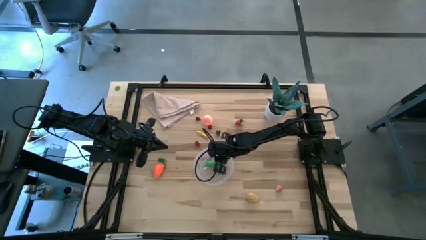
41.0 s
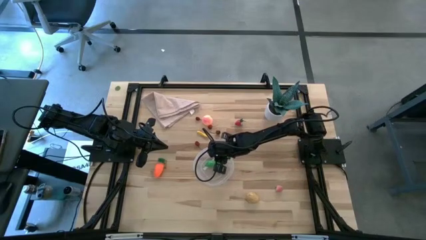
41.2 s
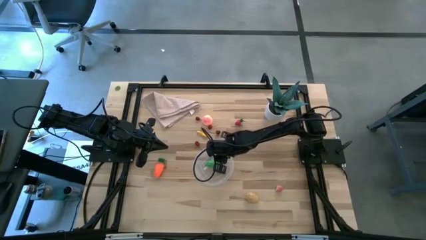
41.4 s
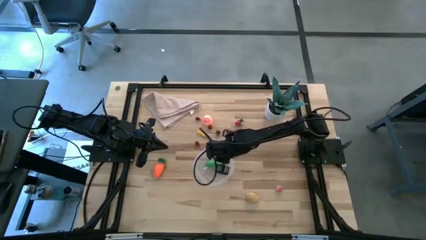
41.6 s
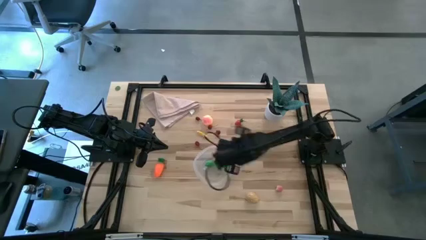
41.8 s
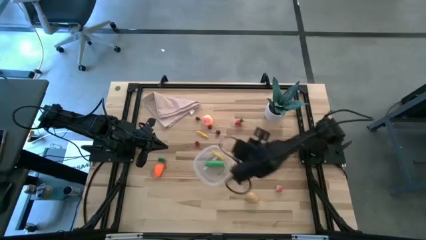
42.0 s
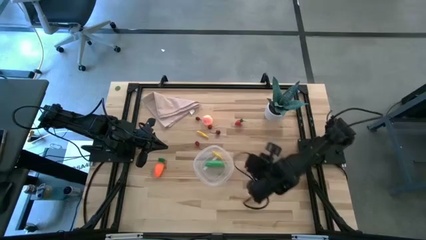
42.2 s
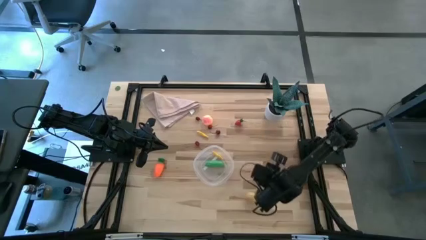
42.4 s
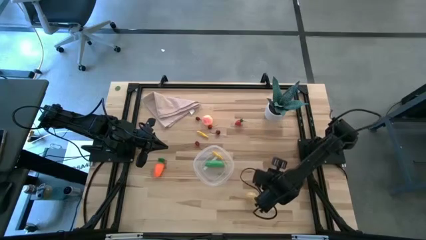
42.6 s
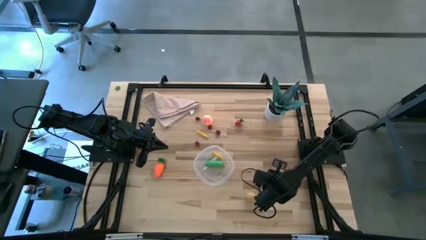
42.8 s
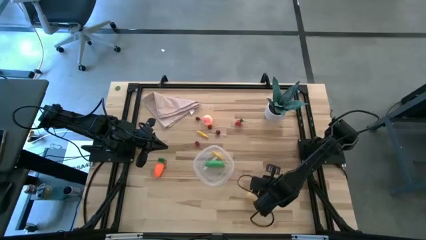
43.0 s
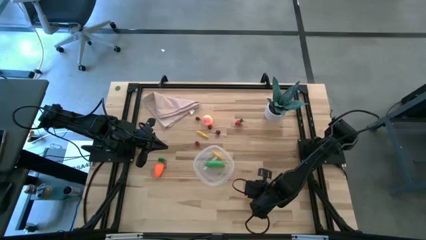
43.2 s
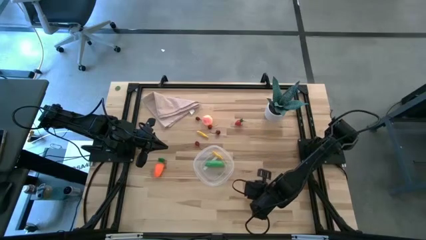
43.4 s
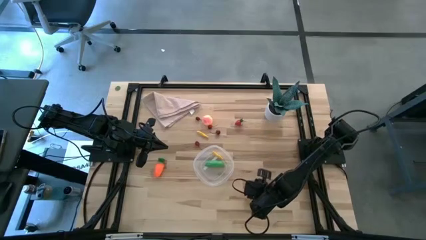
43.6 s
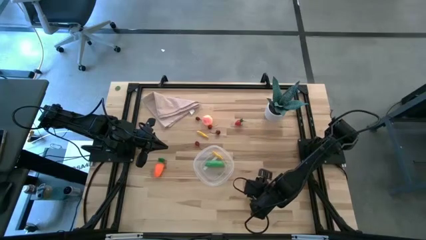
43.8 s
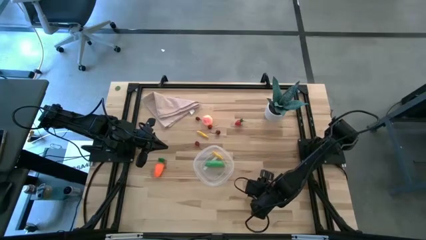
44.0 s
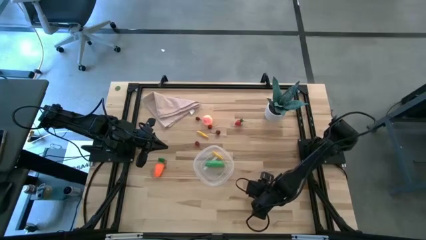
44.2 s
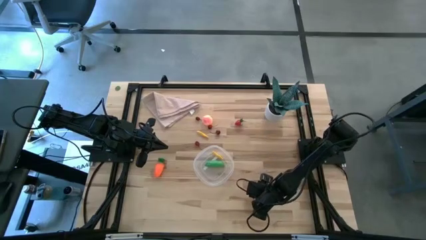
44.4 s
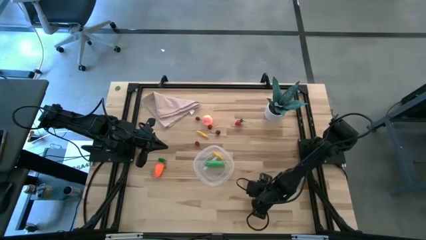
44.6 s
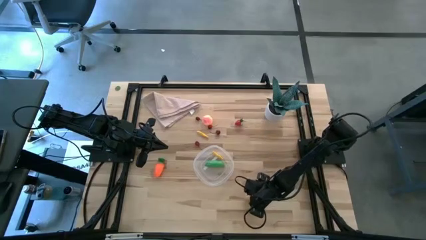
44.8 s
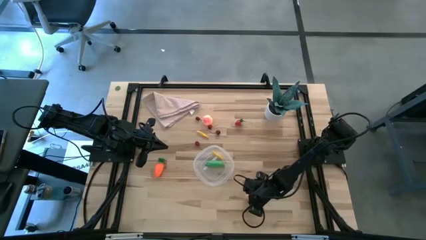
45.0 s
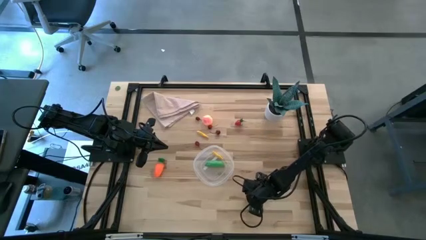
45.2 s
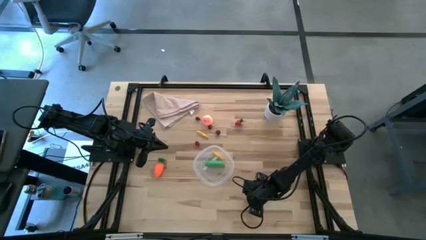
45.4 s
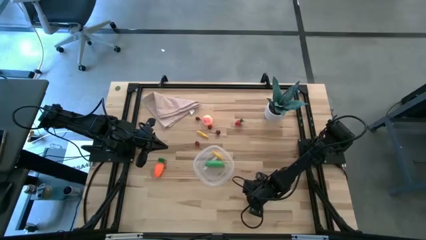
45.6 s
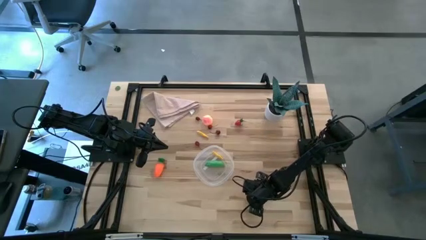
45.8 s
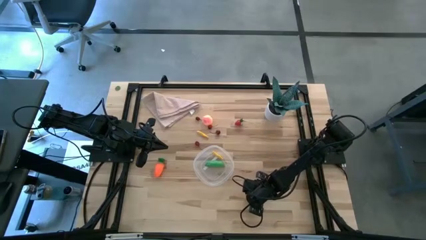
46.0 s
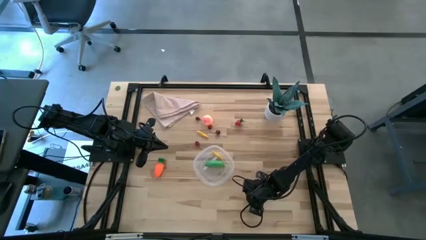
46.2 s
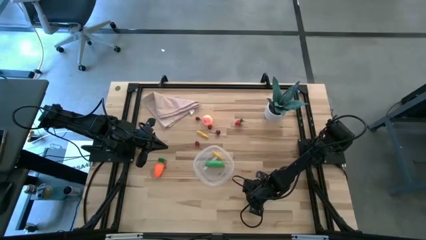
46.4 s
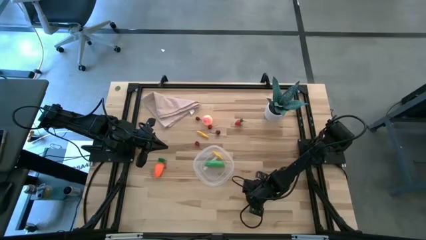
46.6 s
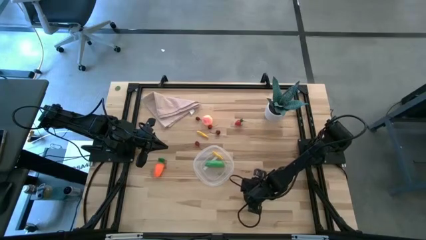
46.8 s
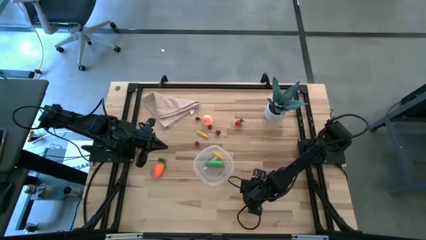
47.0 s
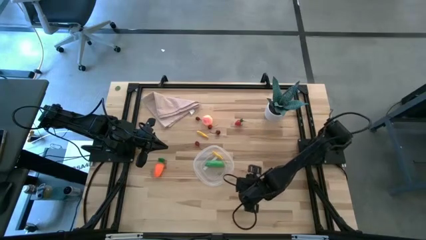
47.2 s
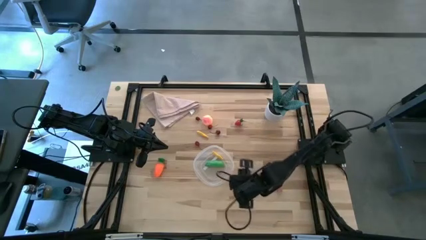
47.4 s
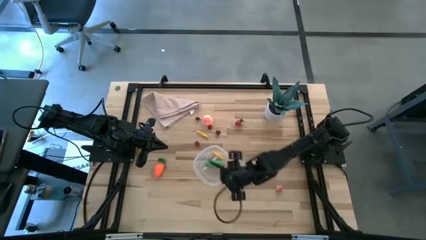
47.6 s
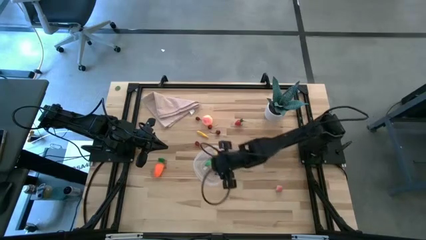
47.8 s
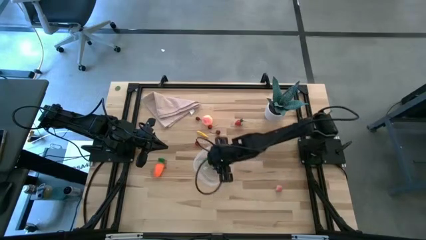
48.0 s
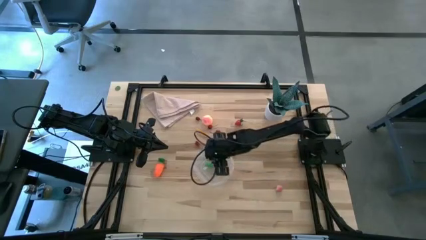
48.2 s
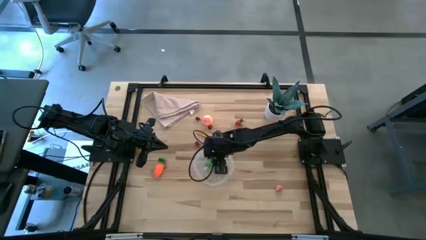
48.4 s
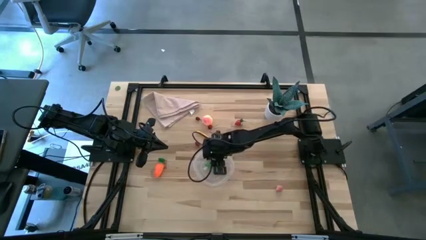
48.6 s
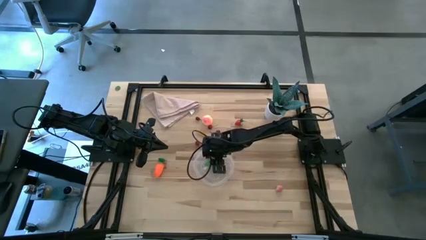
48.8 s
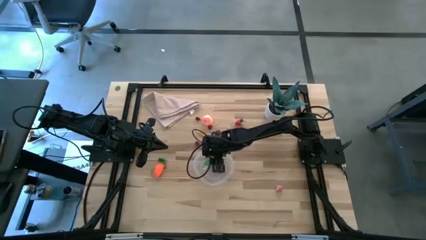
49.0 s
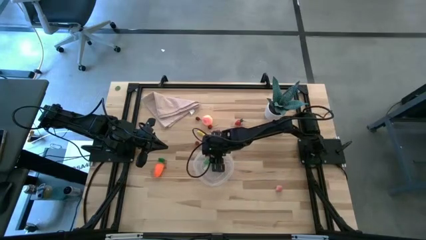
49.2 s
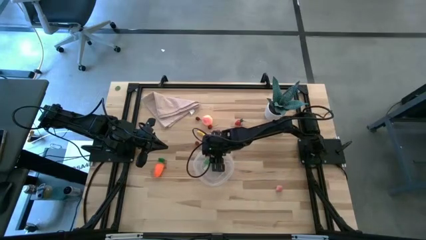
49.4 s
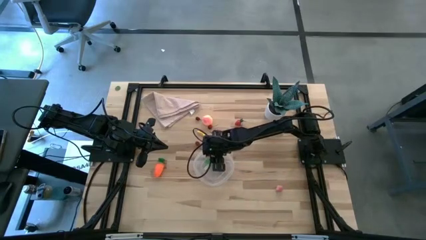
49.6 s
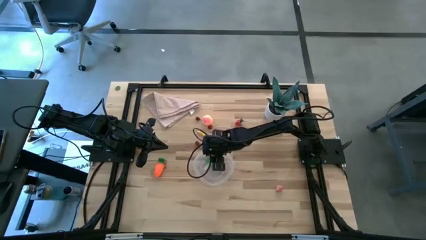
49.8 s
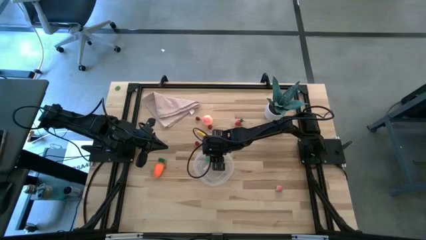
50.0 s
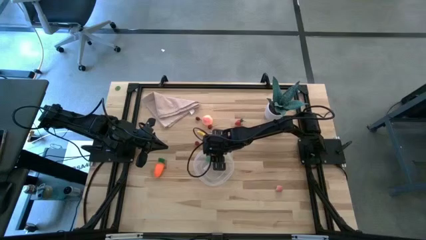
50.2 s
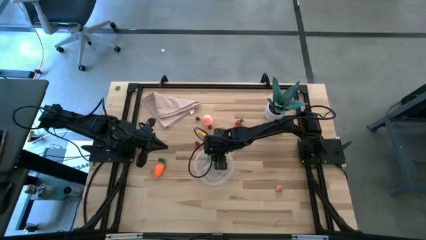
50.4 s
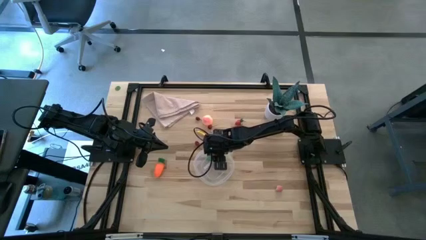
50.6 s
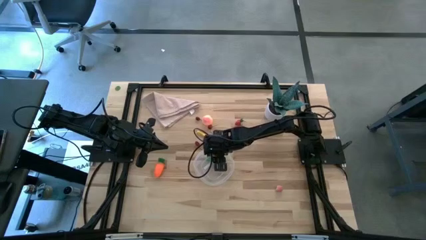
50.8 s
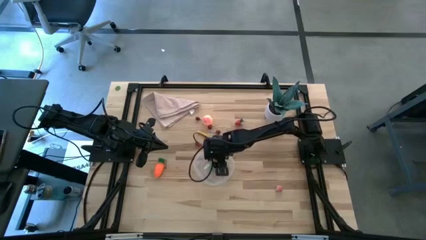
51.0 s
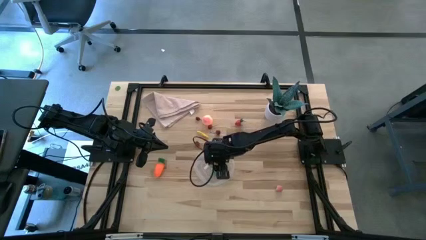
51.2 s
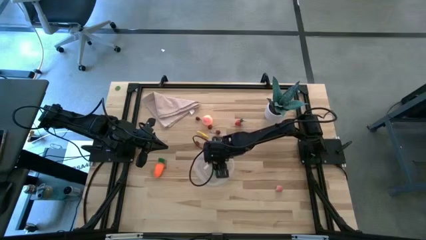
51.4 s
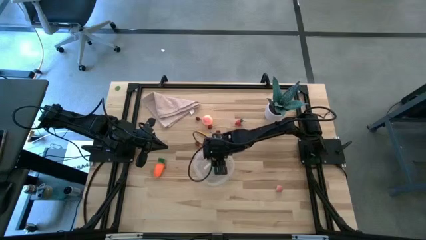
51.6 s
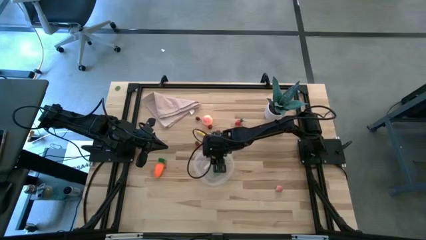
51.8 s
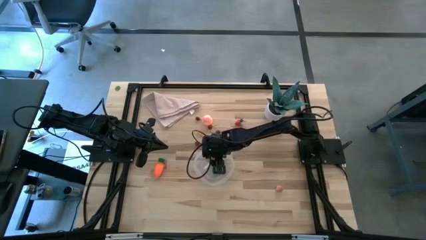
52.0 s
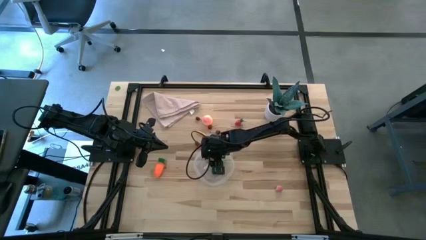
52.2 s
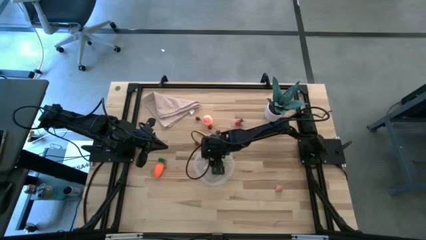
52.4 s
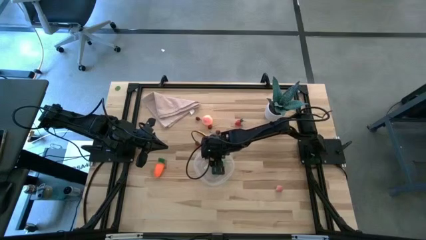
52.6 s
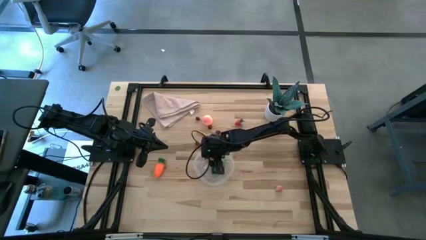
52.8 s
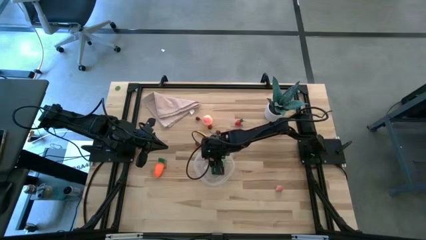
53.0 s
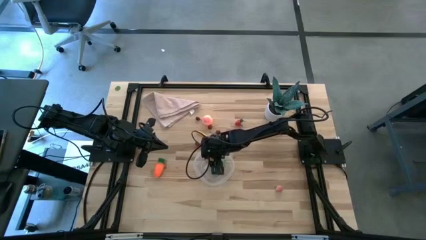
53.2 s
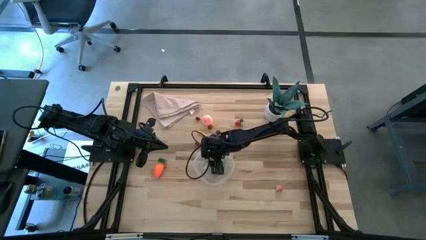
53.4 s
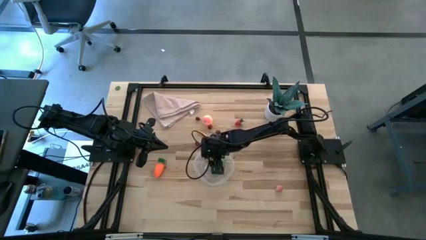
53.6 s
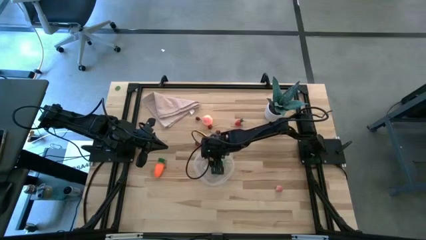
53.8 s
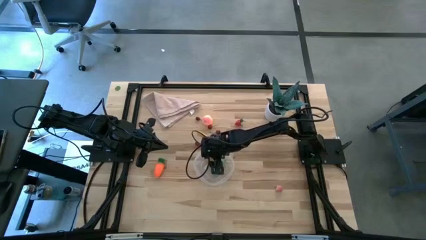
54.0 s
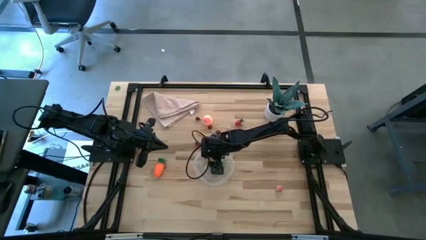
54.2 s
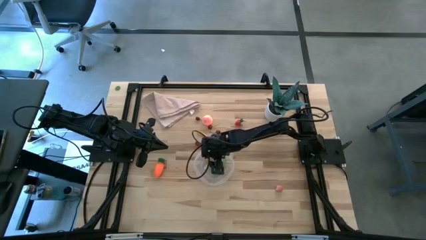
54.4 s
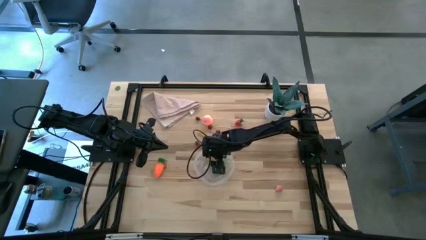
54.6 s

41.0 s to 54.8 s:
Task: Pick and placing Produce into tupperware
Put the potato into the transparent bin
